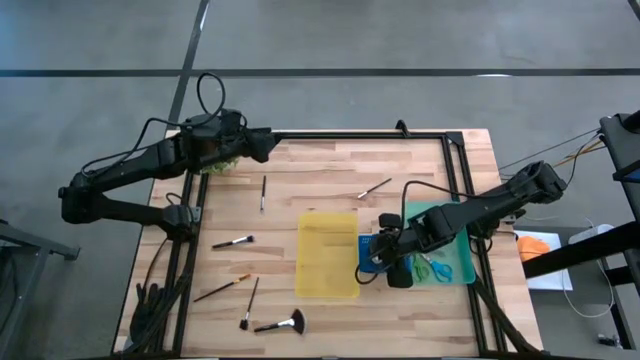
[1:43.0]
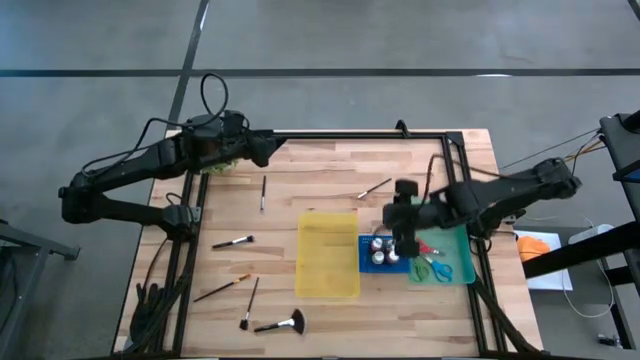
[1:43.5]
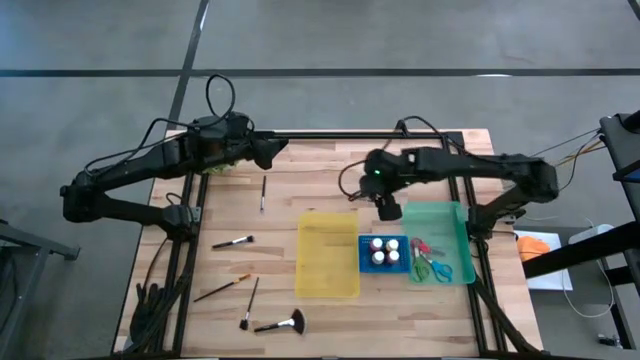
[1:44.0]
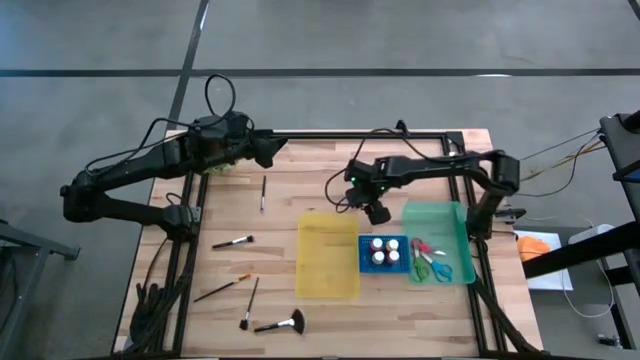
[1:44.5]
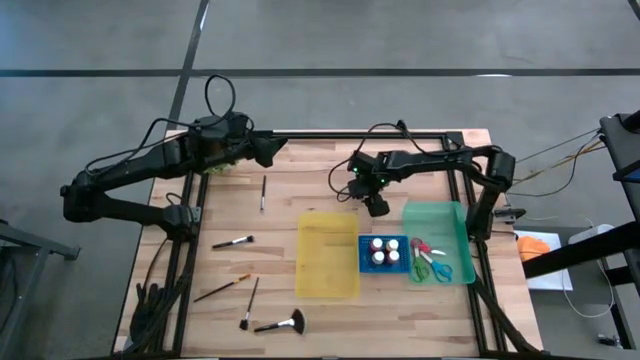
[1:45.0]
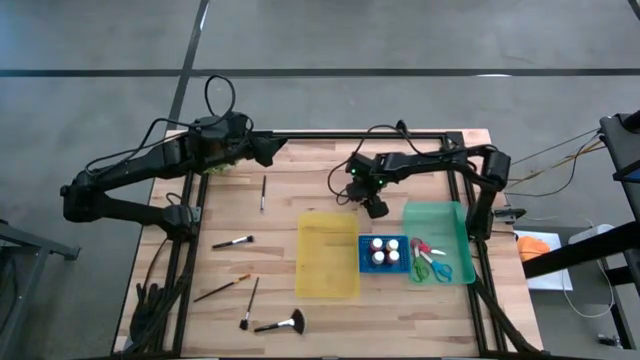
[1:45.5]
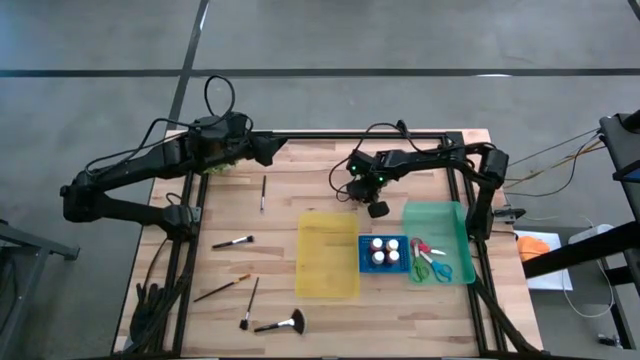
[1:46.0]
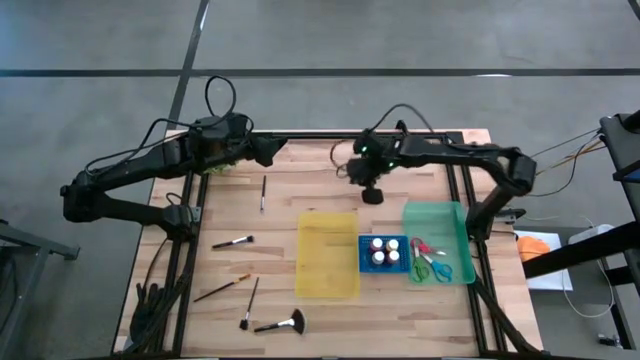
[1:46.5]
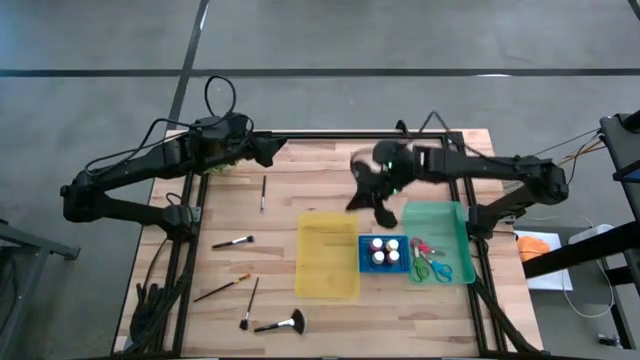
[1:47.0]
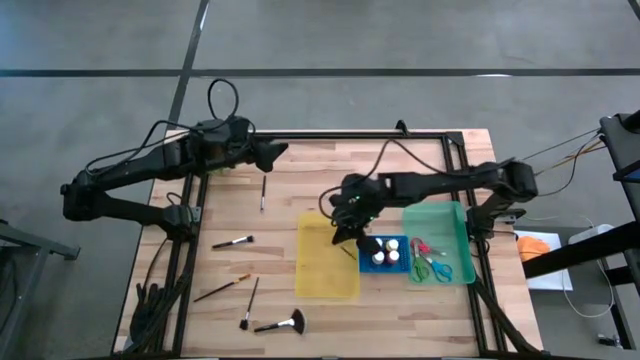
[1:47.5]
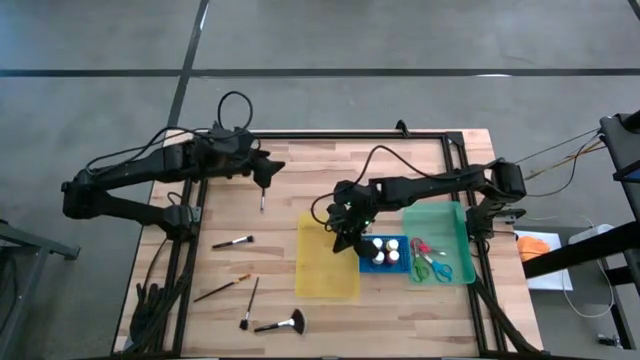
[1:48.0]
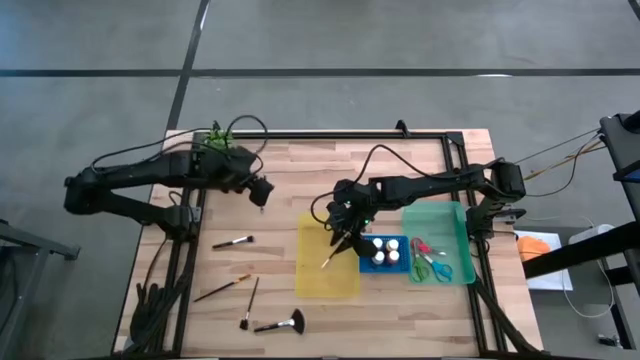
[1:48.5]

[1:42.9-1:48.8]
Task: Pick & Place Paint Supplies
Put the right eyeshadow brush into the yellow bin

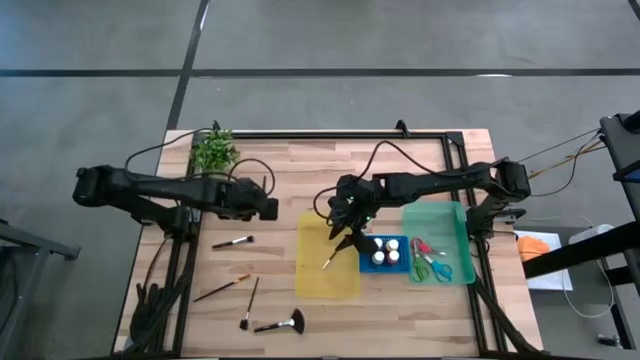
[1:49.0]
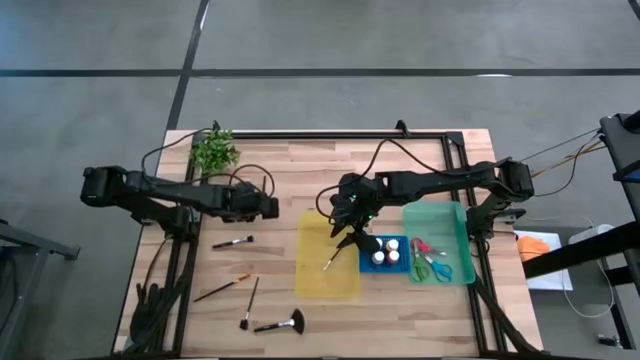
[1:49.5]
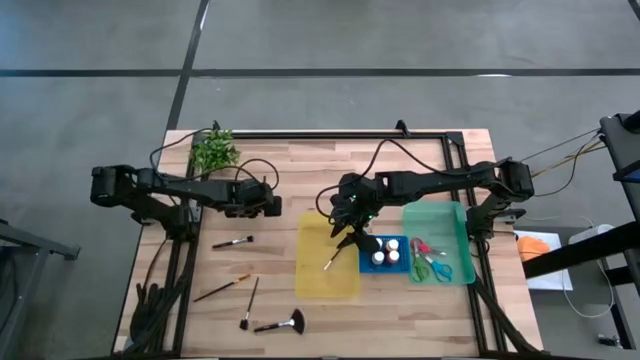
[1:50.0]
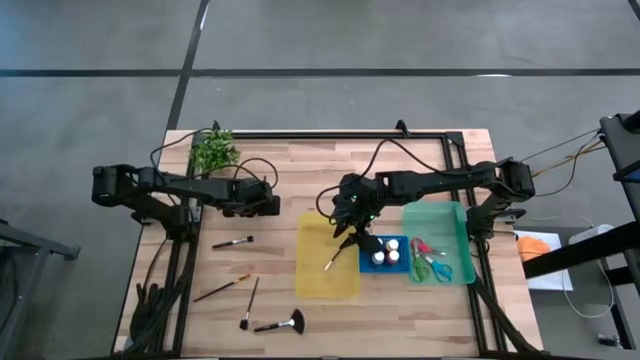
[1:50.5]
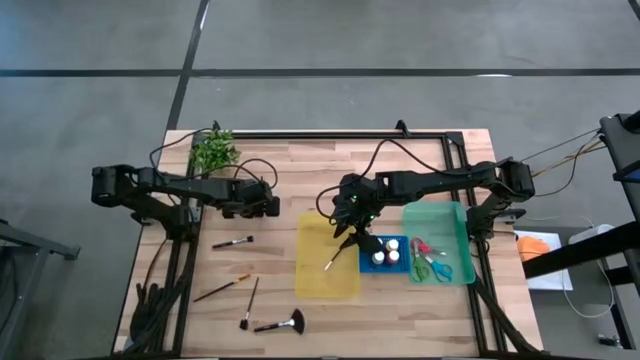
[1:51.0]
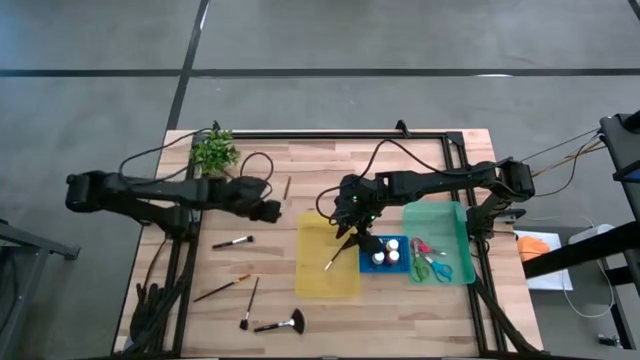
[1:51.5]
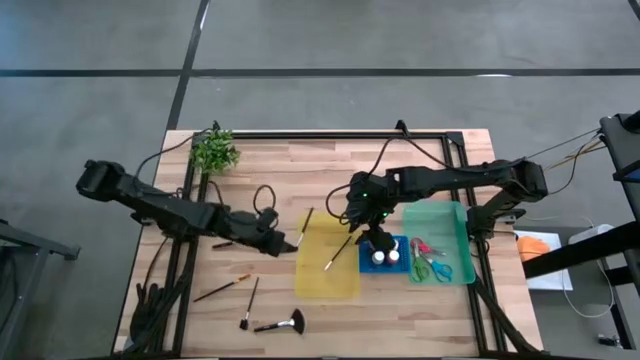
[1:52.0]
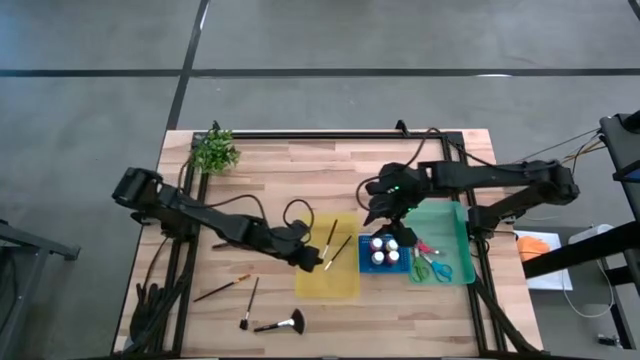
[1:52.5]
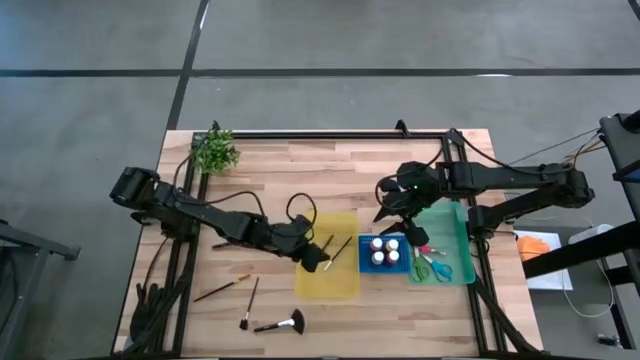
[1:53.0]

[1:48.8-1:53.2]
Put the silver and black eyeshadow brush into the yellow bin

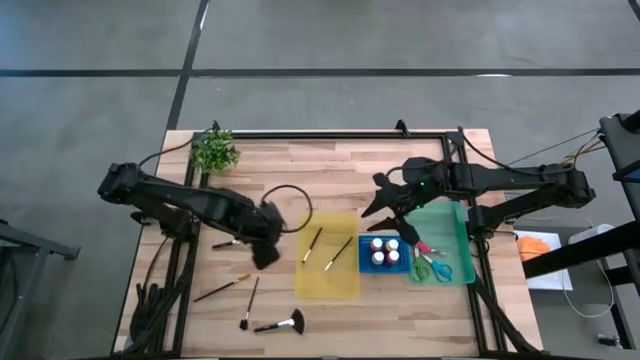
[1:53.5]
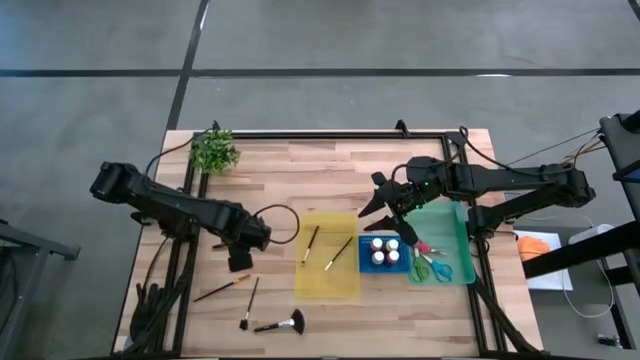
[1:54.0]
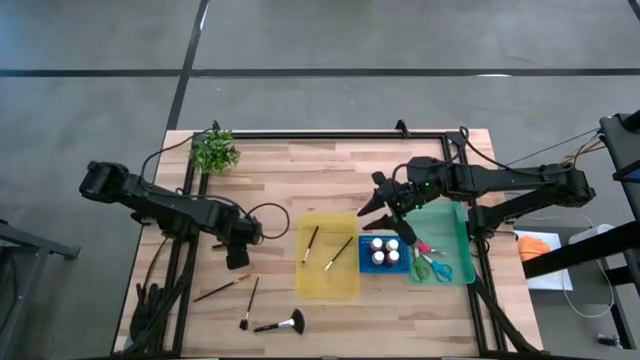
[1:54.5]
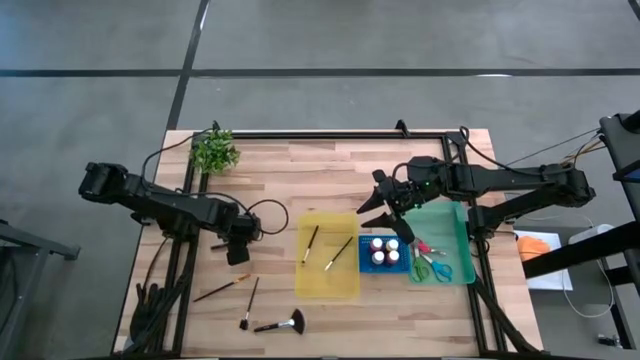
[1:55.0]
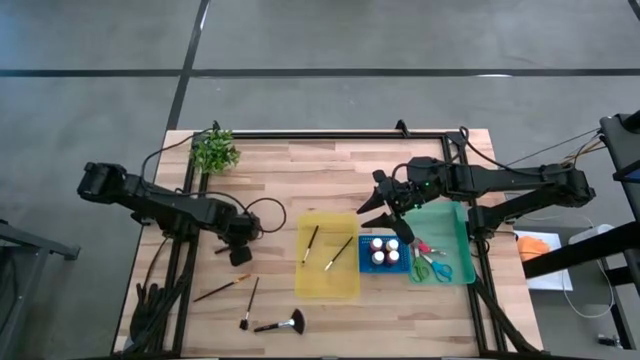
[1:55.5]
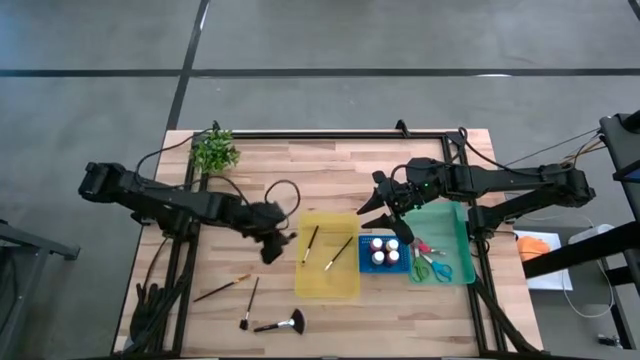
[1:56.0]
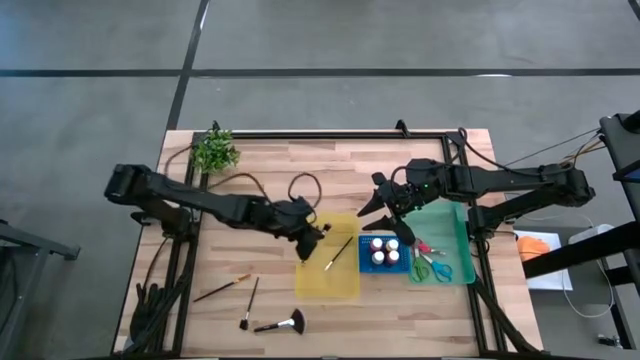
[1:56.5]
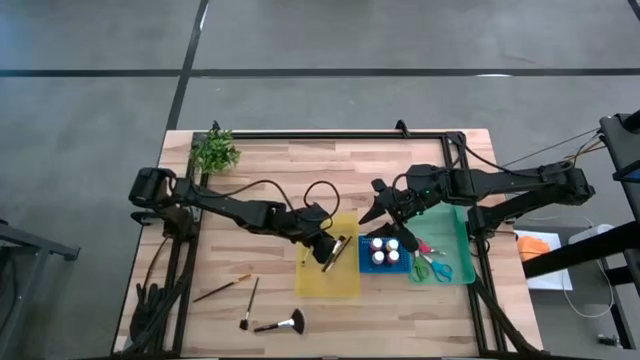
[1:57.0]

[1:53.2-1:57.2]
Put the silver and black foundation brush into the yellow bin

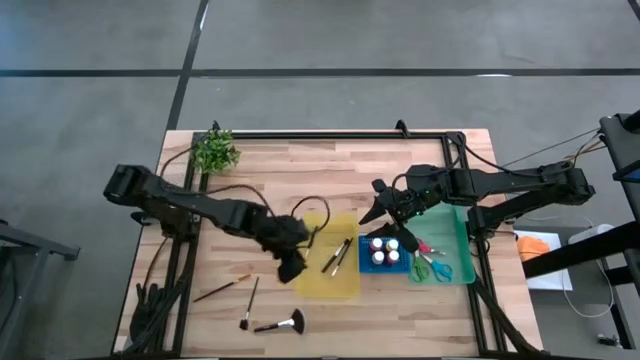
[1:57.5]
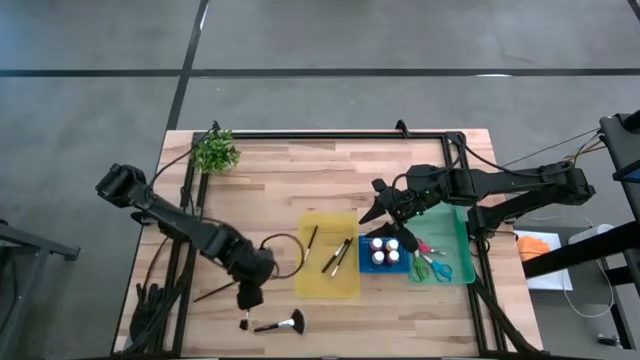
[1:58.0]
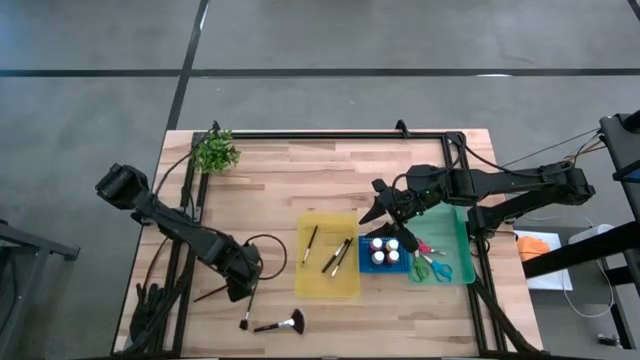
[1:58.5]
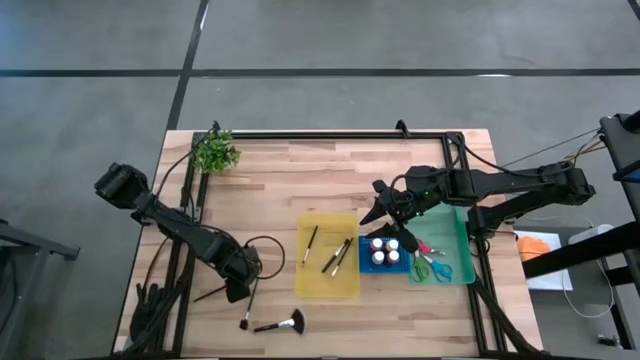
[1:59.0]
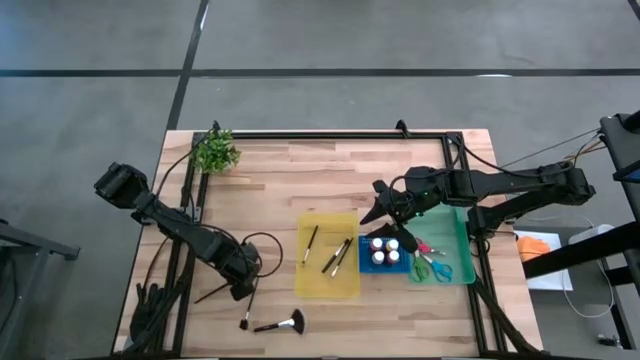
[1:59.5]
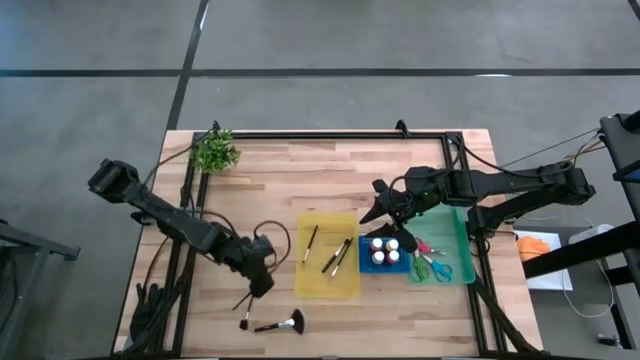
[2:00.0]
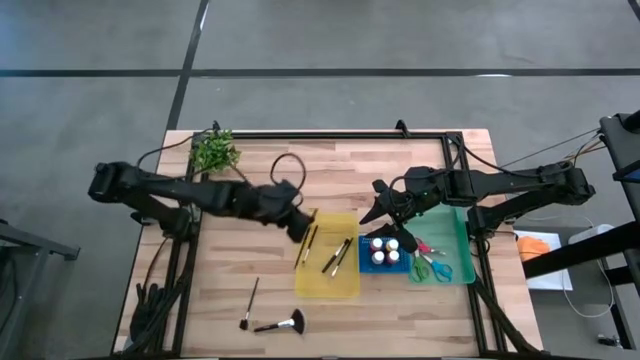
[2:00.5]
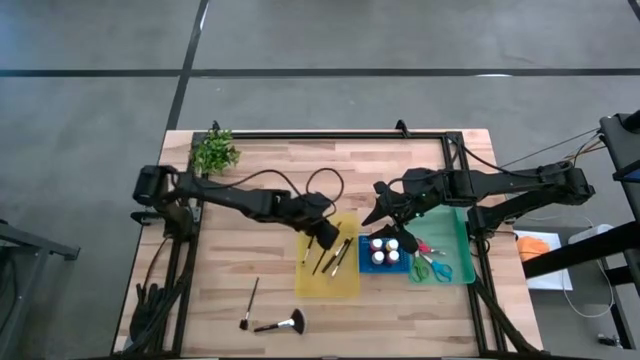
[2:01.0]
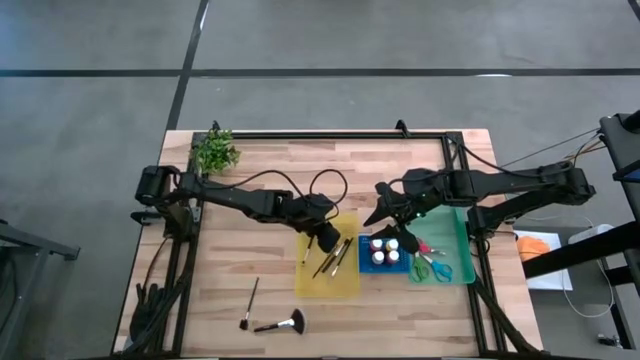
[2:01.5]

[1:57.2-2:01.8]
Put the gold and black paint brush into the yellow bin

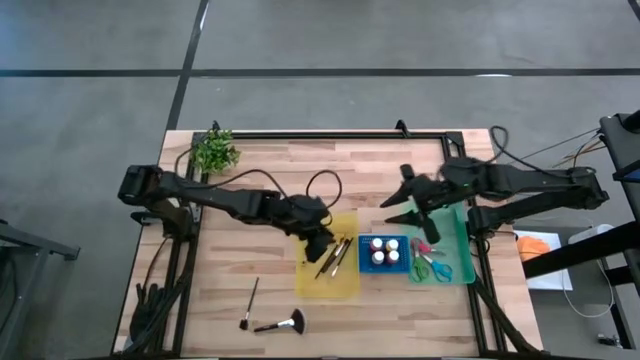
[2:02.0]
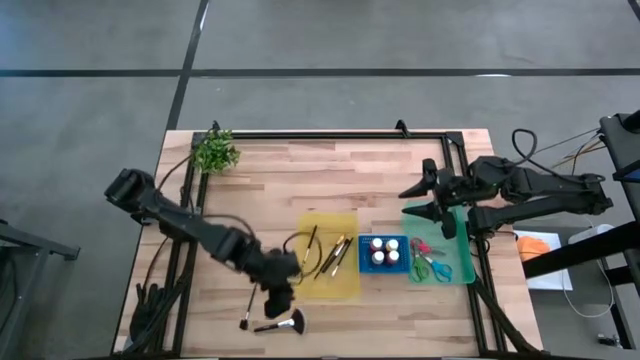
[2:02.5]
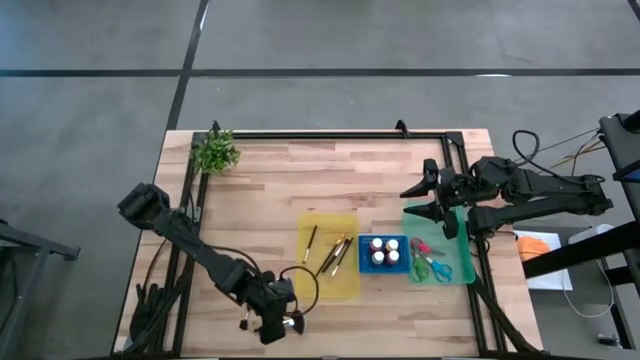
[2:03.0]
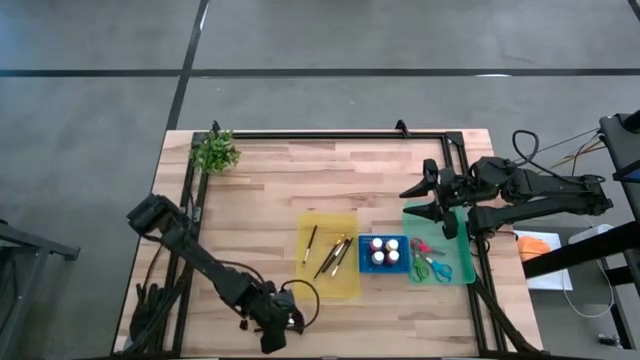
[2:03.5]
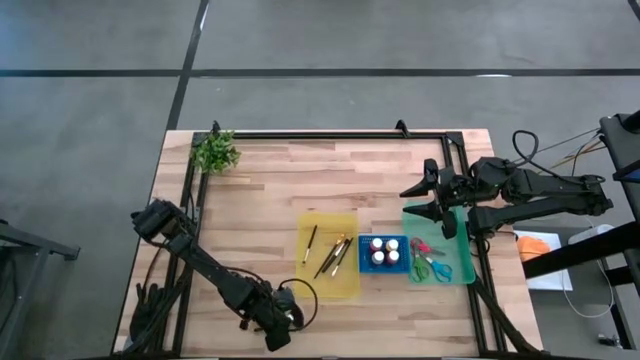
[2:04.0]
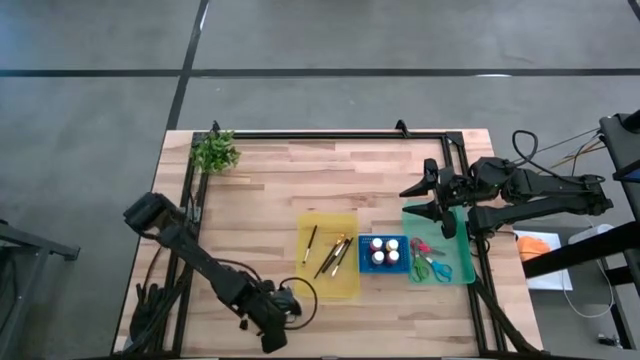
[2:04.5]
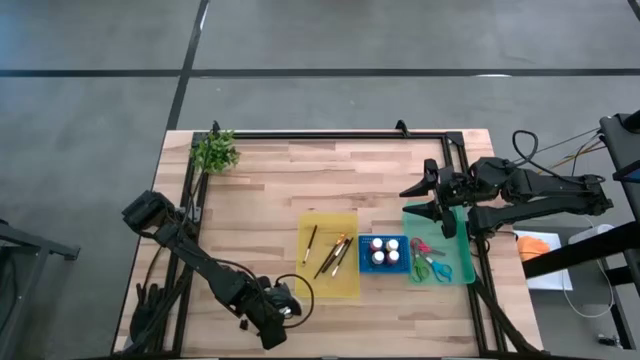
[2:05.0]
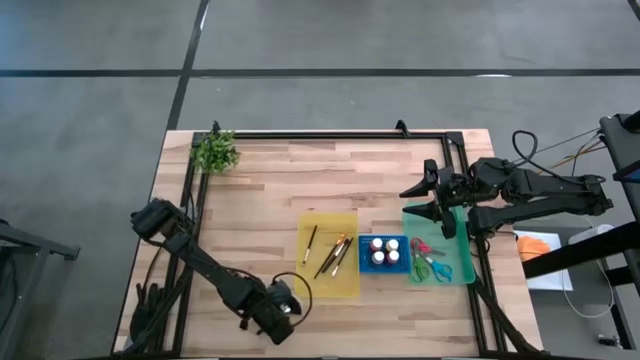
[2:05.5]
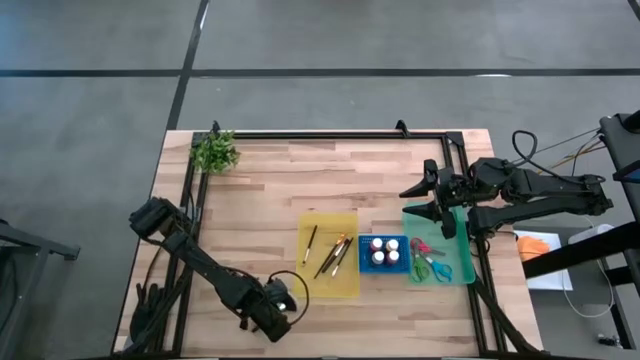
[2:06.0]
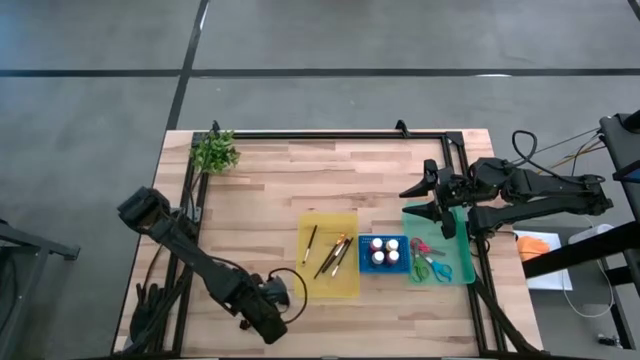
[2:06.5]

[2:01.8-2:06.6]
Put the silver and black highlighter brush into the yellow bin
